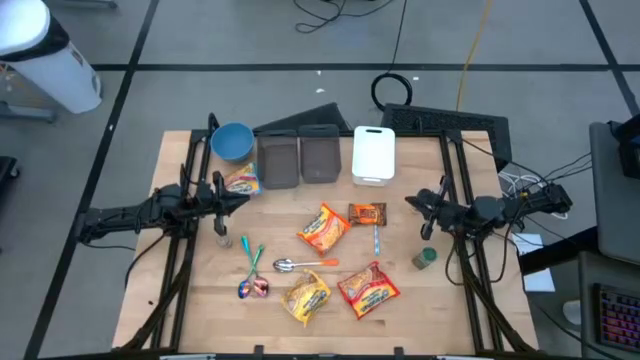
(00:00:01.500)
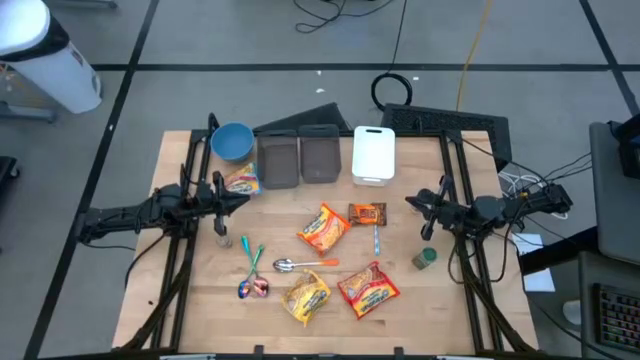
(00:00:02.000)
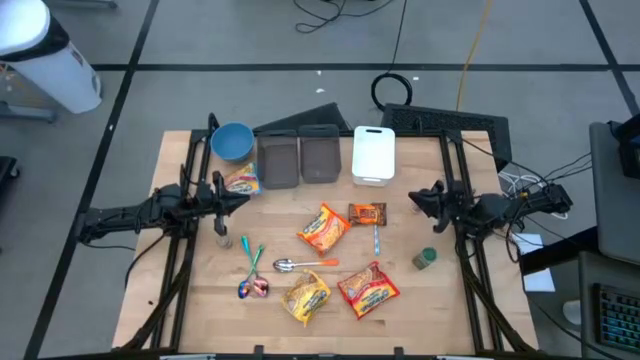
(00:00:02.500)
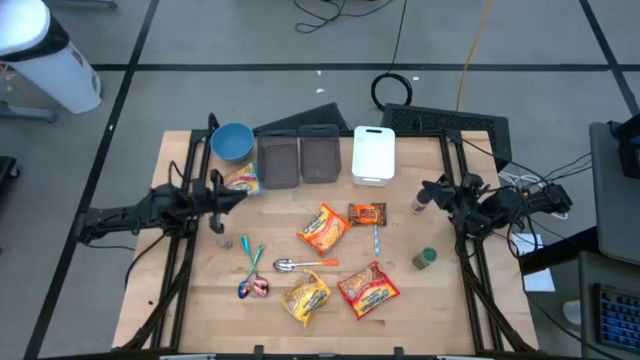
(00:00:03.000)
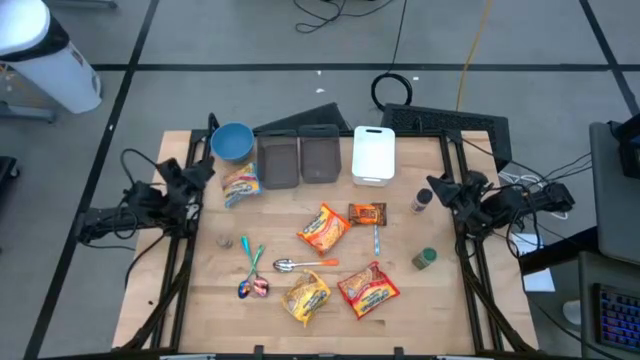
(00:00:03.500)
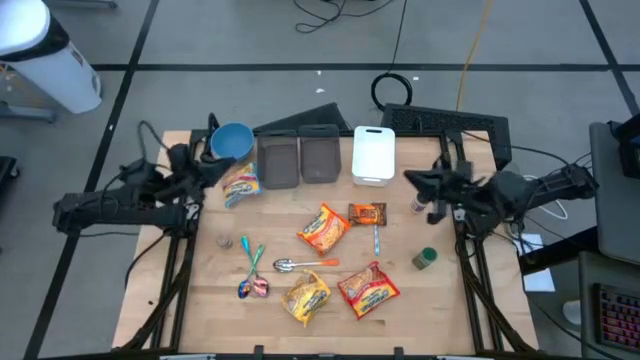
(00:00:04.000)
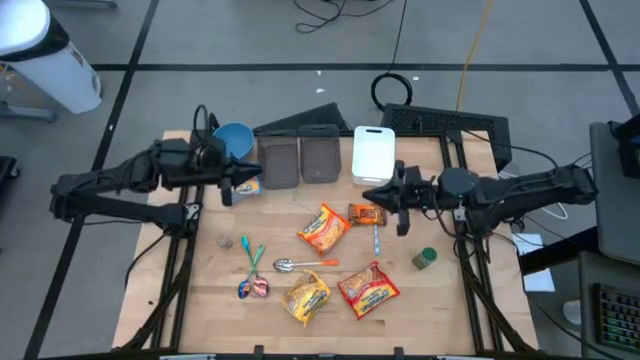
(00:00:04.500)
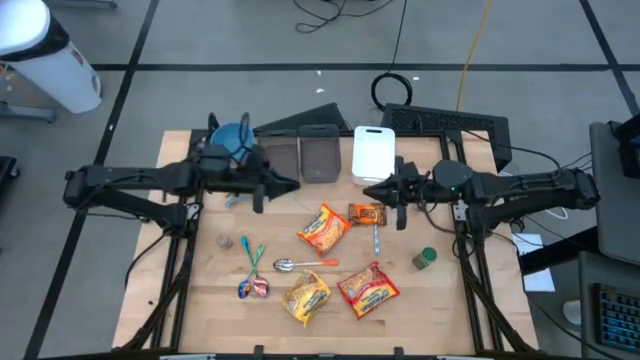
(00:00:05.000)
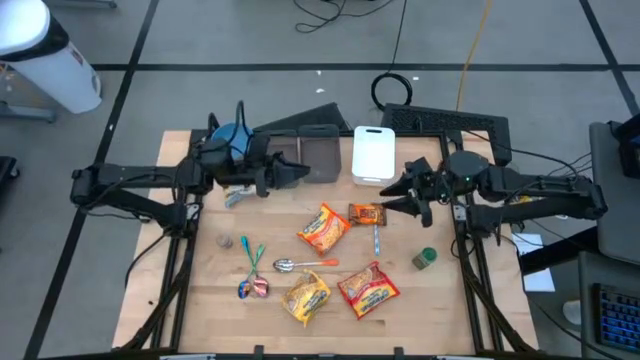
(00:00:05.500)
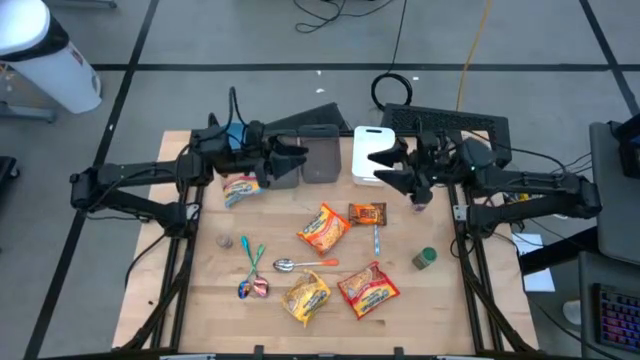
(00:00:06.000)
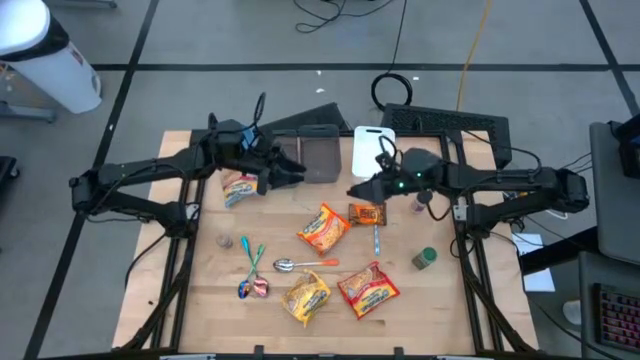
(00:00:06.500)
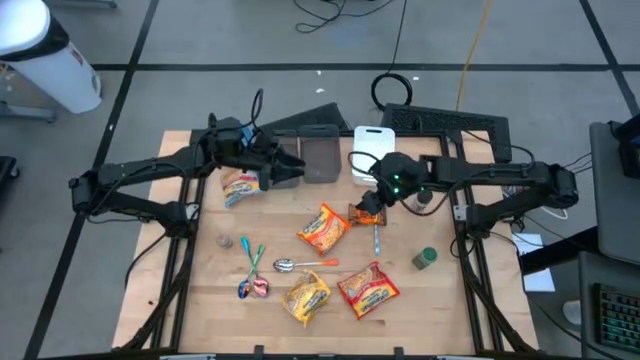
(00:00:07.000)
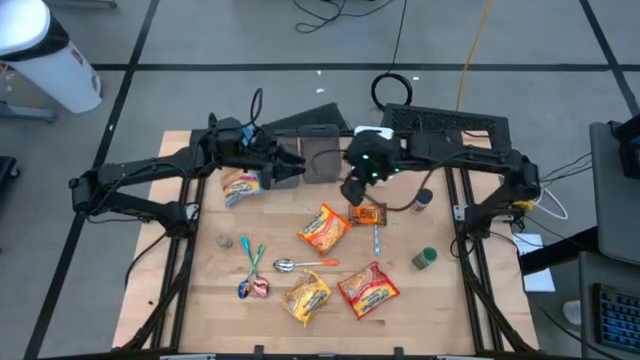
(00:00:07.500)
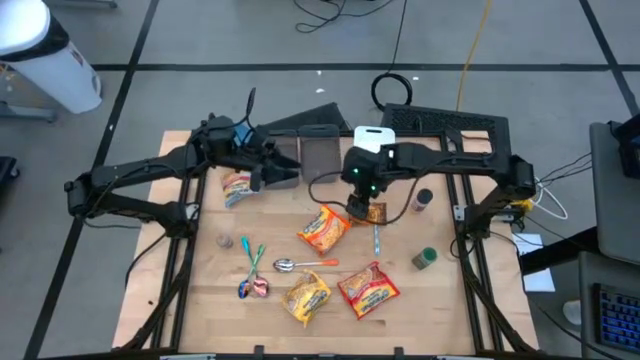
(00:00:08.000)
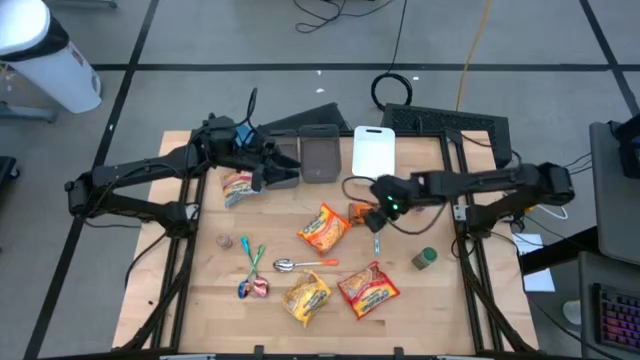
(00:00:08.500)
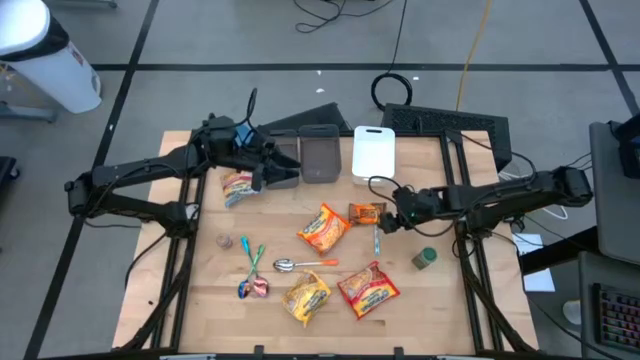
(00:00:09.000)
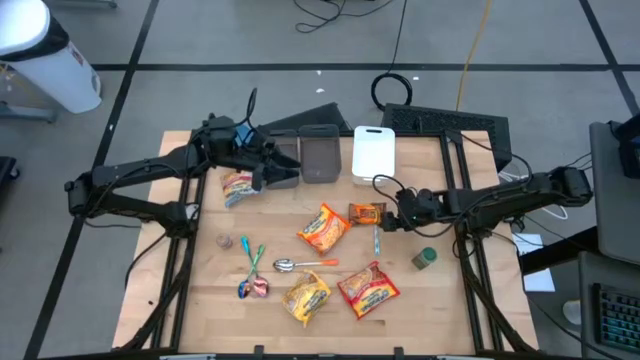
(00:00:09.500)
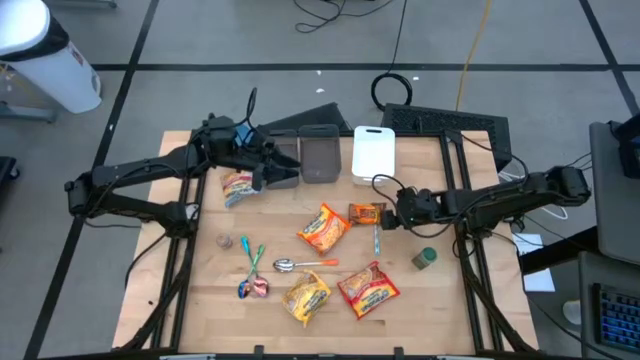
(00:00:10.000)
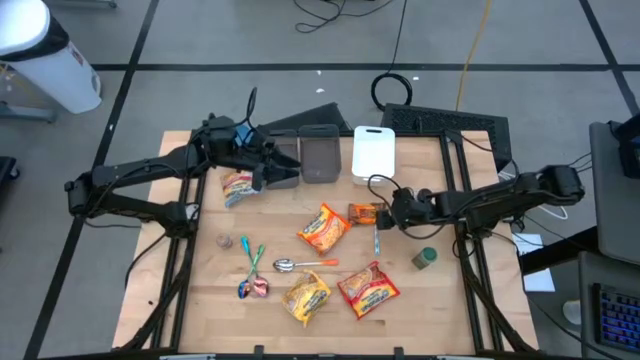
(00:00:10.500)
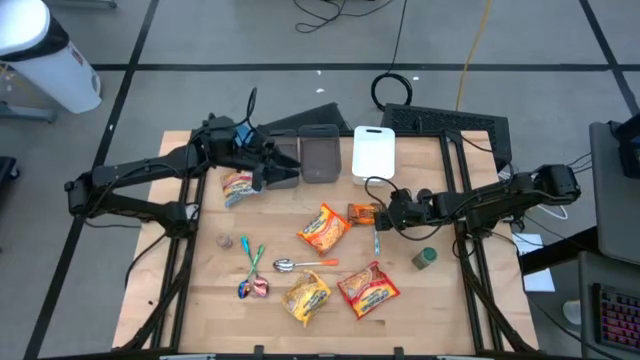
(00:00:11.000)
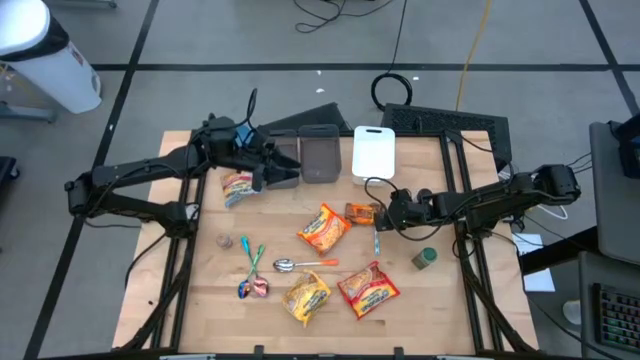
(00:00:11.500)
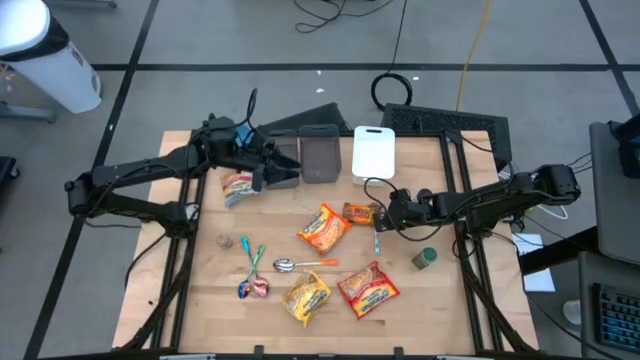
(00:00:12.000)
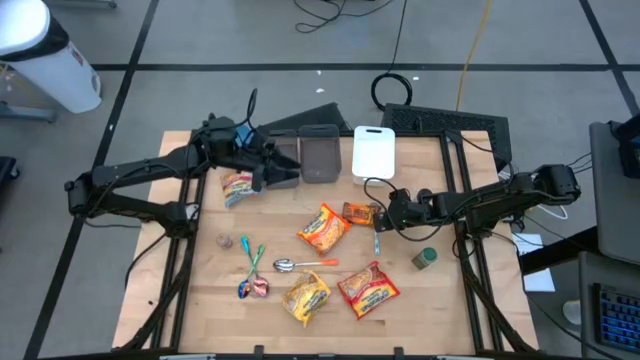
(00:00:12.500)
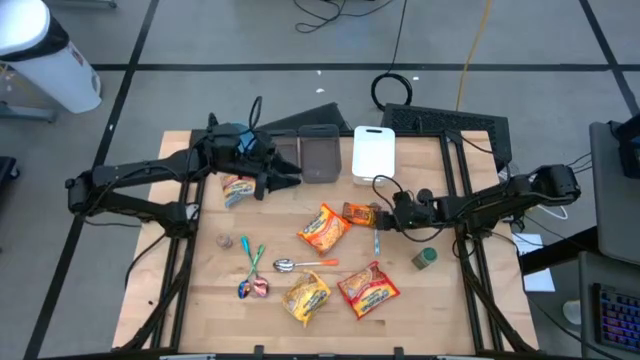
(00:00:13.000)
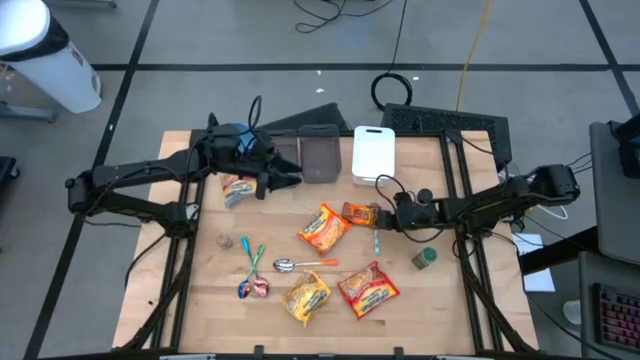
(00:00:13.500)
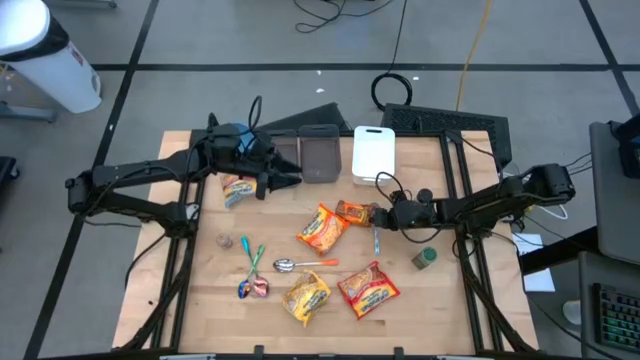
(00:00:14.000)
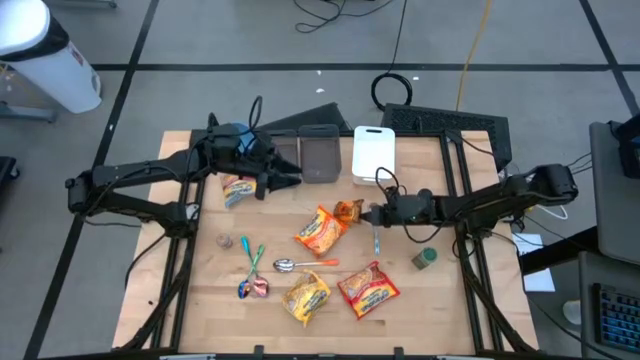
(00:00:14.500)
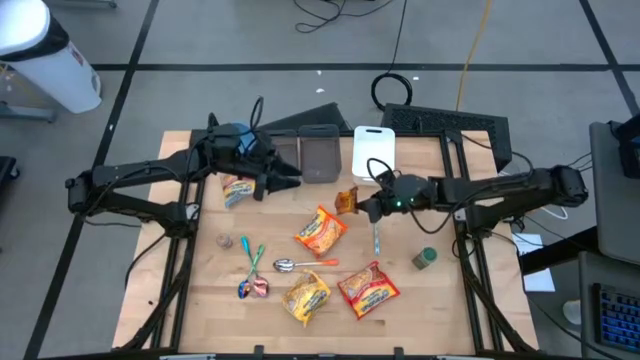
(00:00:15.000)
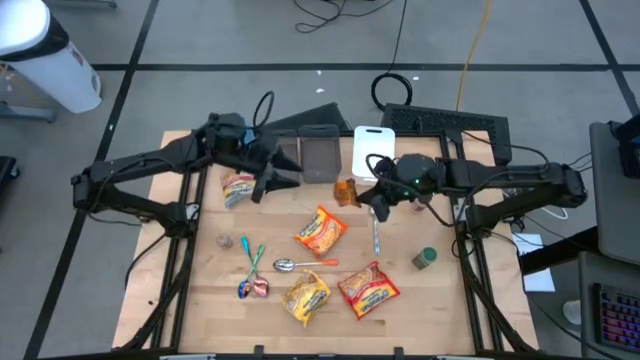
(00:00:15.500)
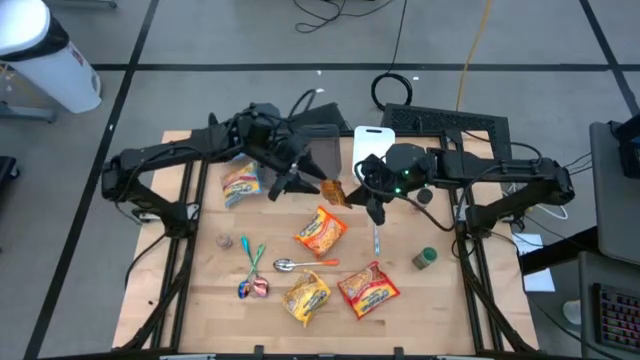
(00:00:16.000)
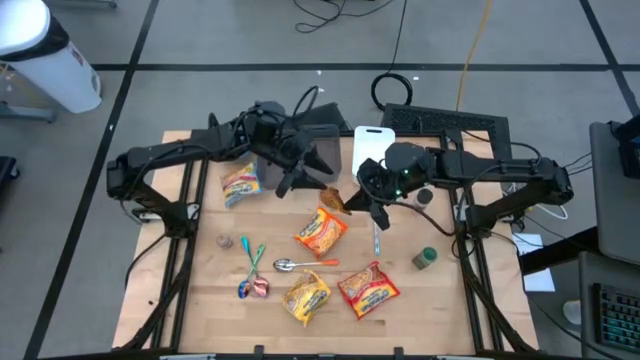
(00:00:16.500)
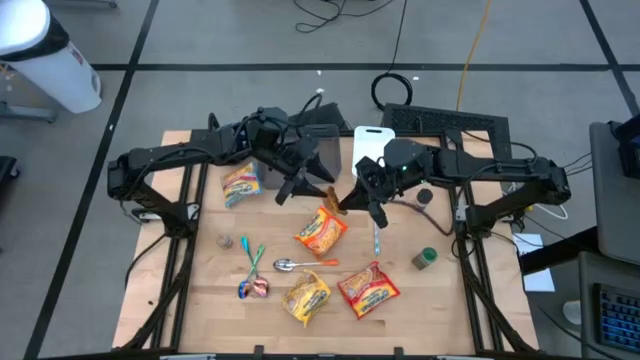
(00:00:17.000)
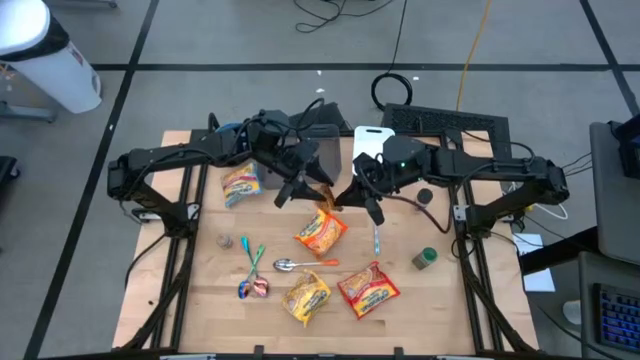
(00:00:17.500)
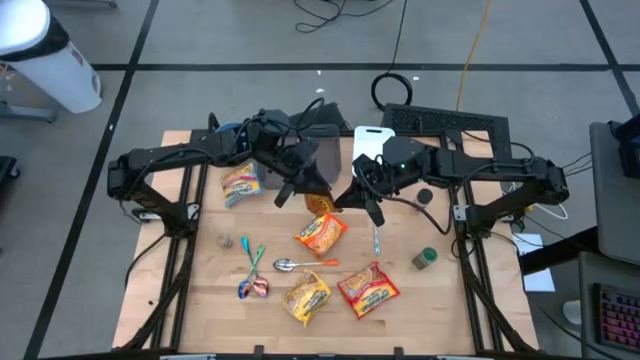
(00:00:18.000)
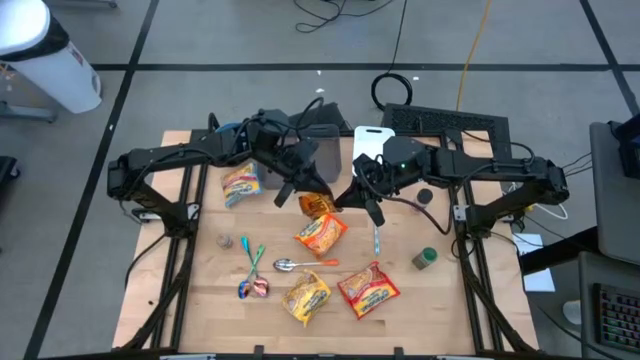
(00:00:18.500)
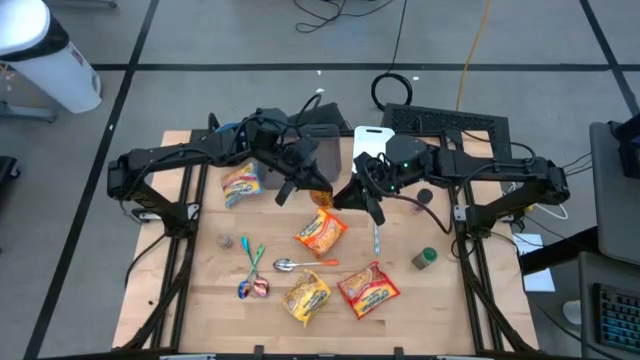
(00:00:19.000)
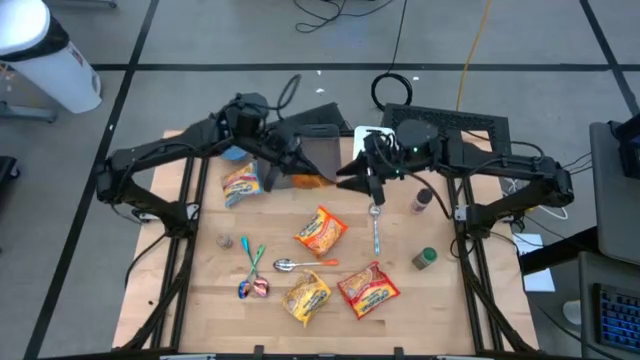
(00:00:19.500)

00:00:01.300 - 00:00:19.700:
Task: Pick & Place Food Item
Put the orange seasoning pack into the right black bin
